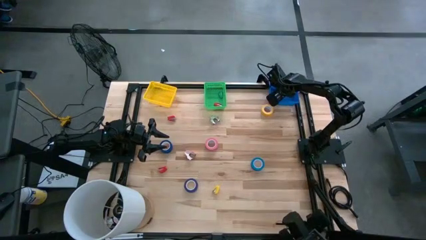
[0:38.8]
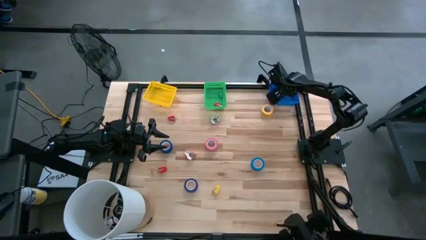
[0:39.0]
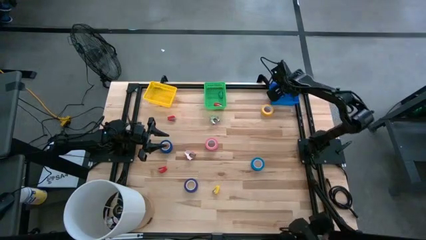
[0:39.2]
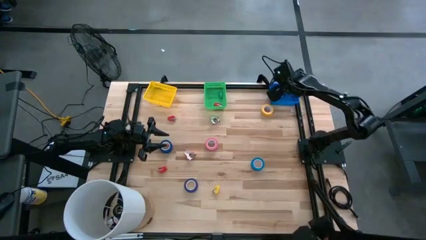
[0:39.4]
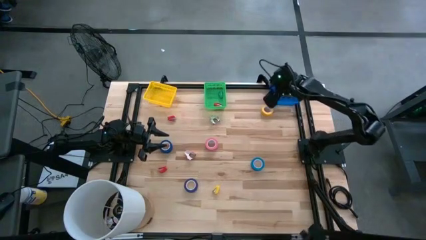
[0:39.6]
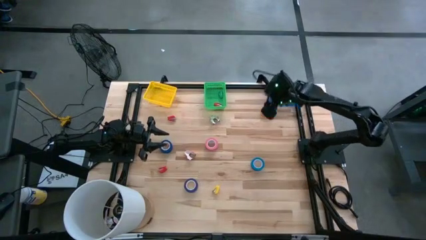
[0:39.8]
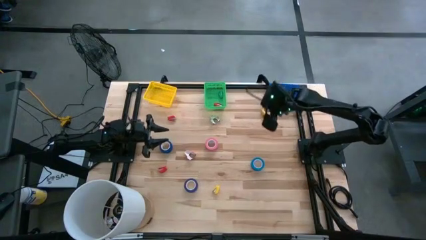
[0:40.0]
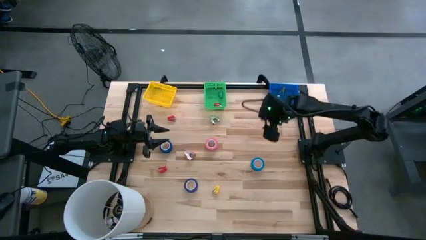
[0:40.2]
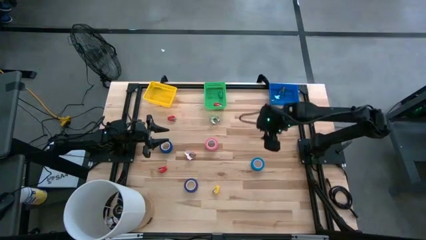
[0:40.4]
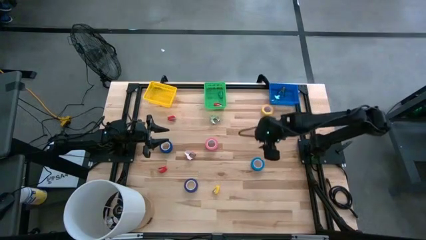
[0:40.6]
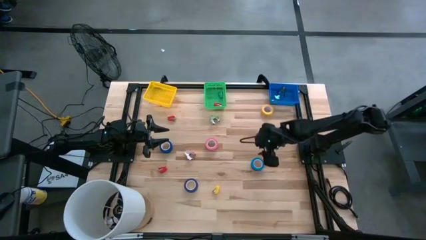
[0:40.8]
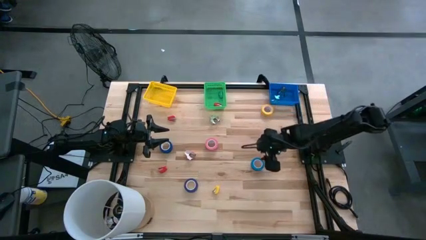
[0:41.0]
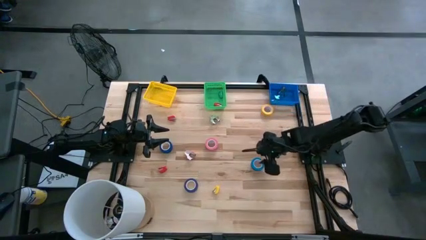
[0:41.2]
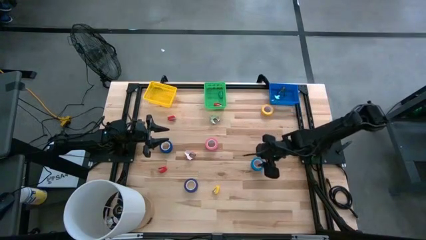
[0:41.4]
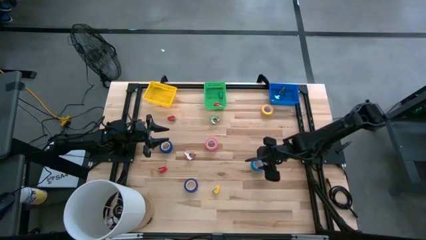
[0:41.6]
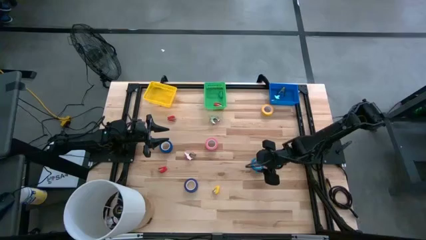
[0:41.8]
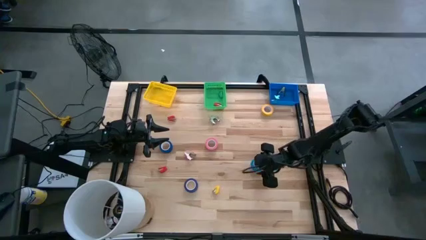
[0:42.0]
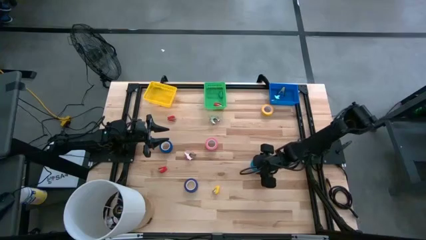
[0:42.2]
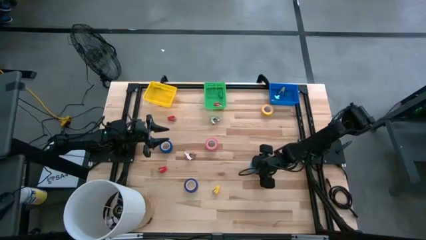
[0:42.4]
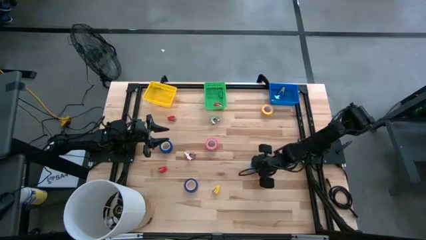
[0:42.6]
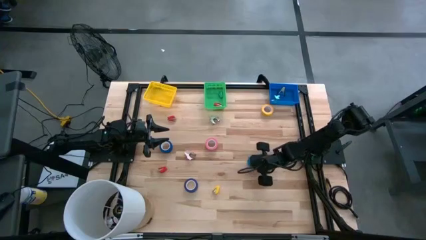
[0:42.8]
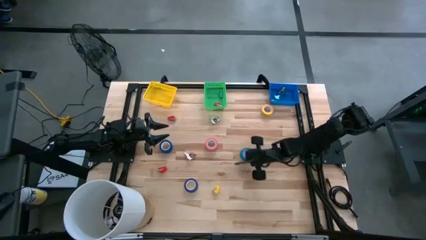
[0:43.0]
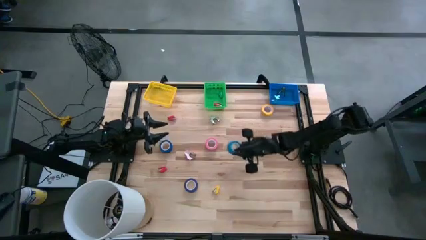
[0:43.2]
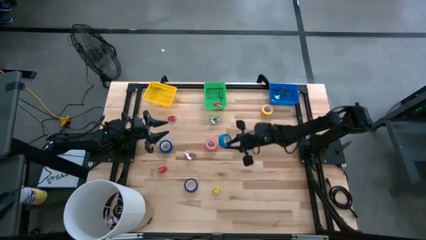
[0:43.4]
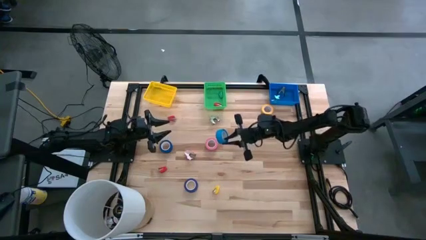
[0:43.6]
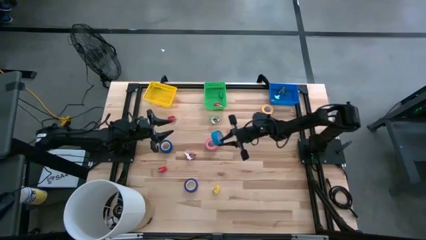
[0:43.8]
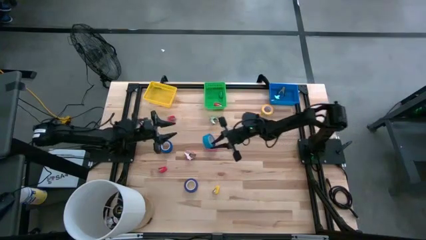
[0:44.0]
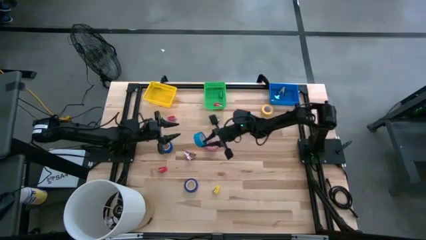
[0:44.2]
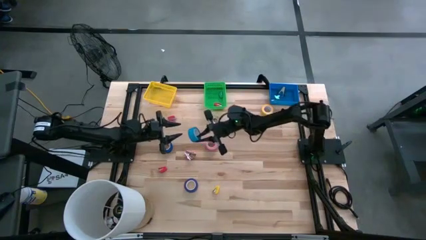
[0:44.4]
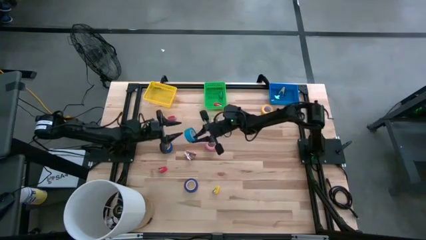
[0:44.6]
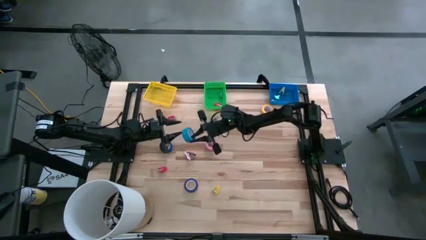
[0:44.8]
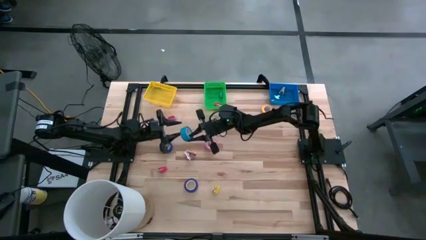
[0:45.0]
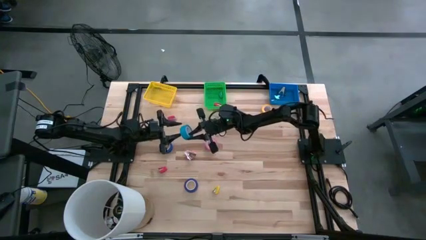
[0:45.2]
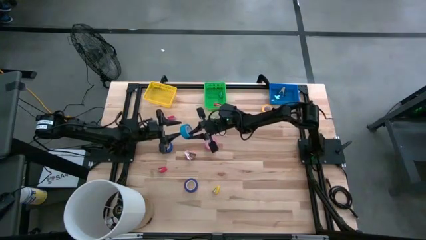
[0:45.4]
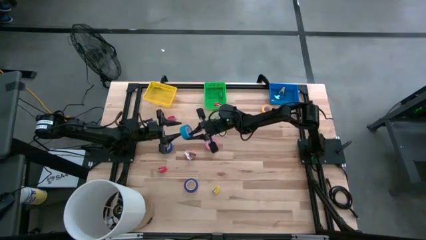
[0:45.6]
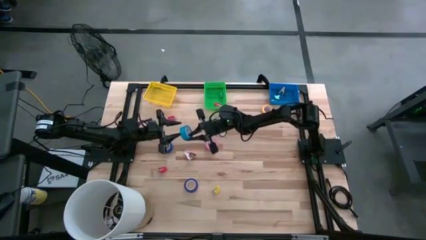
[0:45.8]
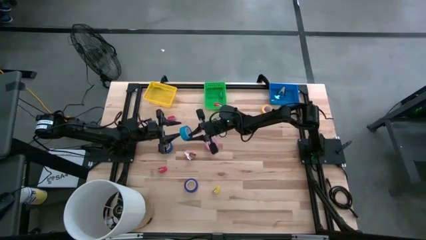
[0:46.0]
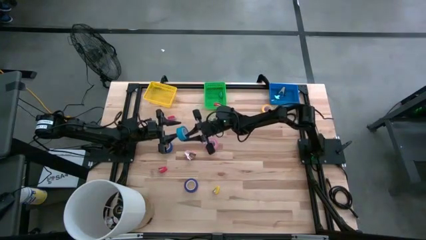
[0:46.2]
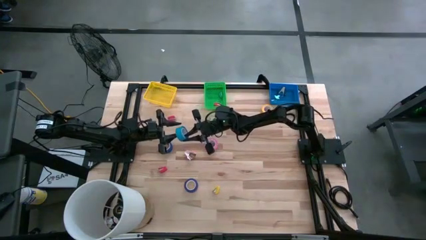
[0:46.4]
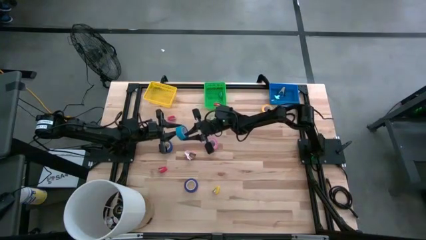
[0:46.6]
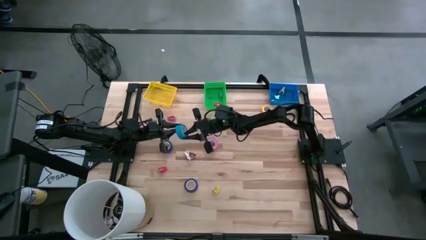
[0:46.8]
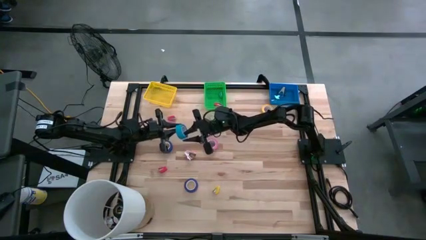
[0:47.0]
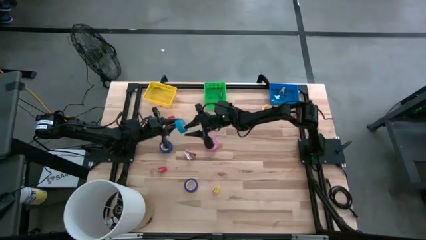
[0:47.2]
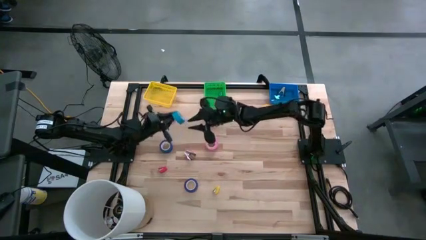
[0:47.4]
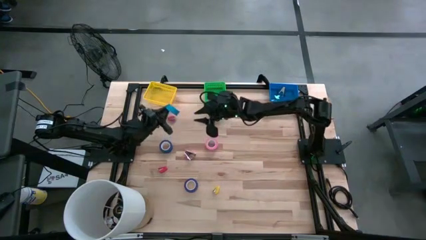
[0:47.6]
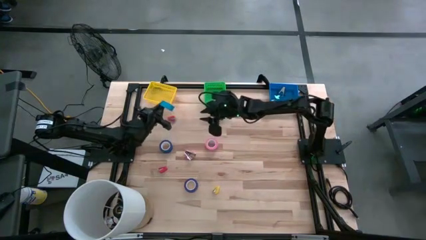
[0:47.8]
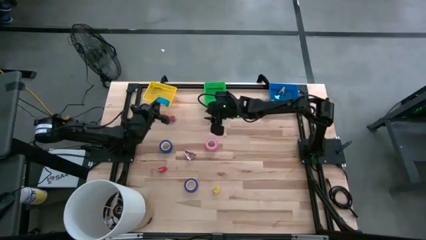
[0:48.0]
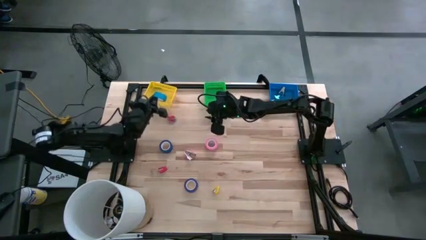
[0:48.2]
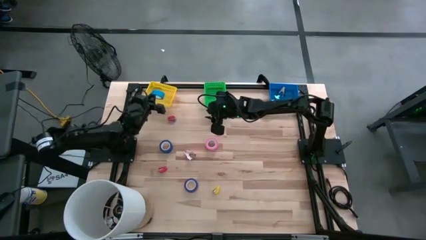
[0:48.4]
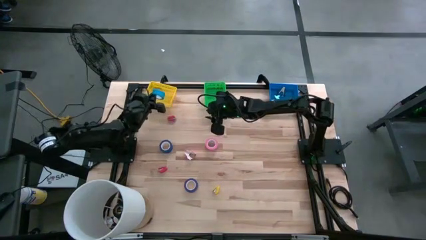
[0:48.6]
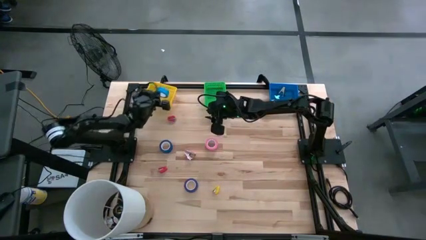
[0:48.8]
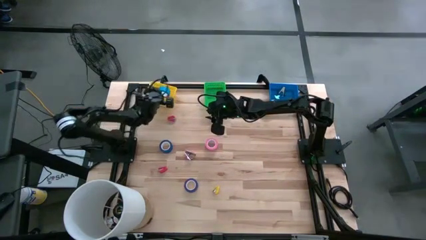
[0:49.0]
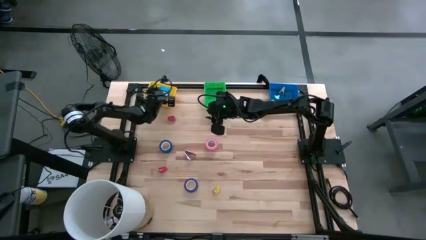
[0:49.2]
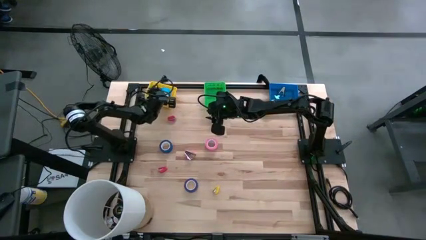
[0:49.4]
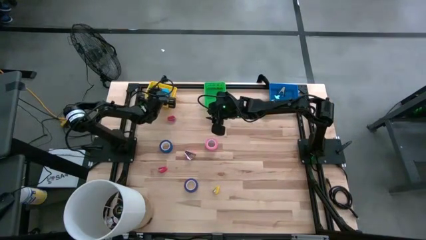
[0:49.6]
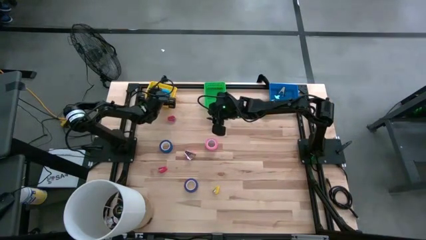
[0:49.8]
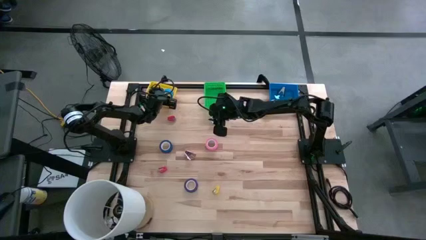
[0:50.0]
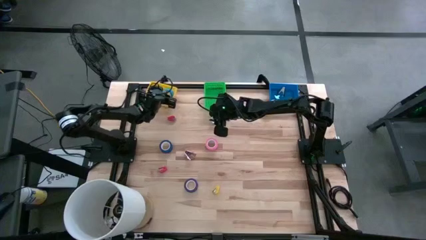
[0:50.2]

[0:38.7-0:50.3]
Task: Pick and place Stapler, Stapler remover, tape
Put the blue tape into the yellow basket

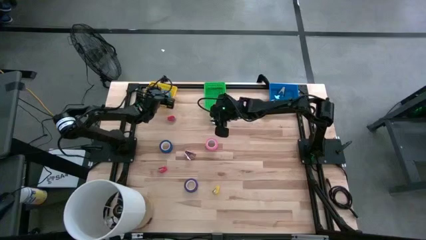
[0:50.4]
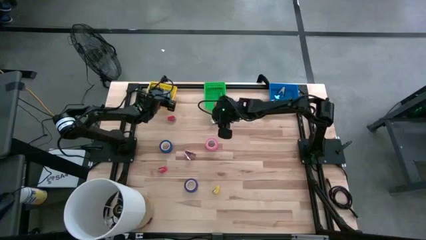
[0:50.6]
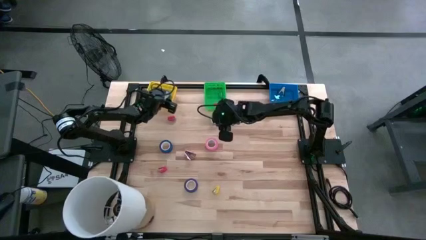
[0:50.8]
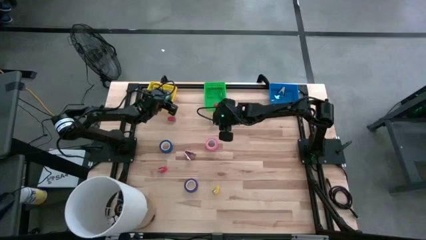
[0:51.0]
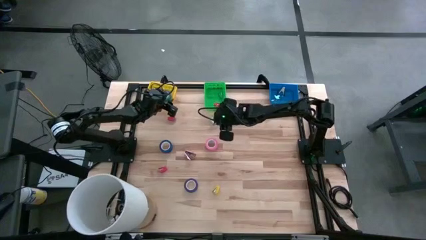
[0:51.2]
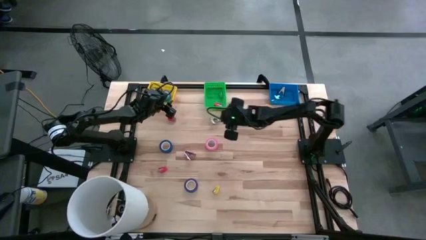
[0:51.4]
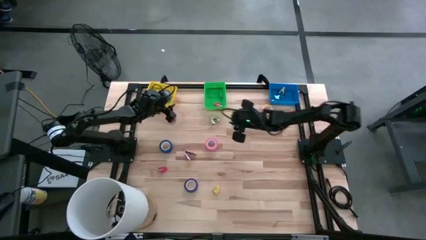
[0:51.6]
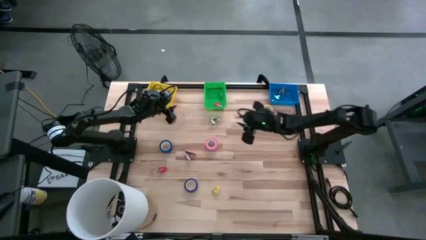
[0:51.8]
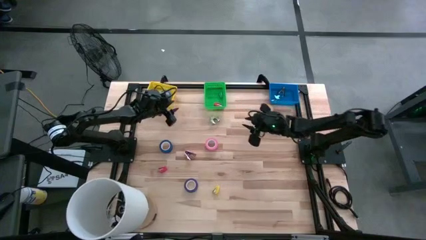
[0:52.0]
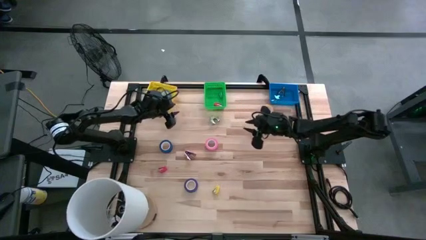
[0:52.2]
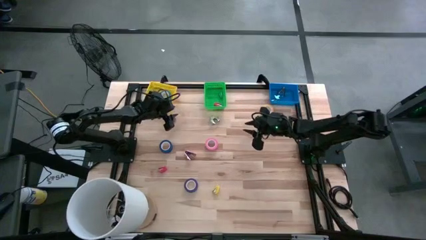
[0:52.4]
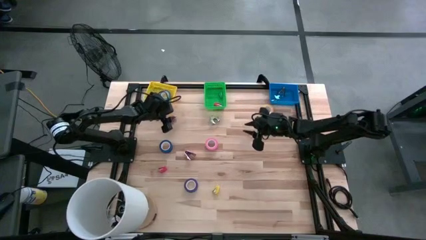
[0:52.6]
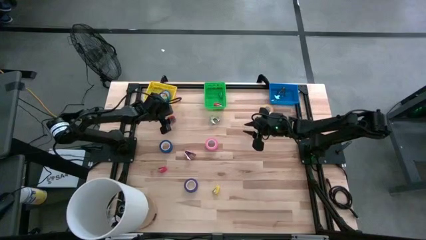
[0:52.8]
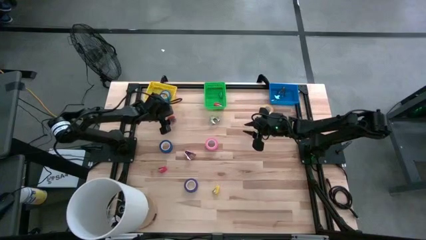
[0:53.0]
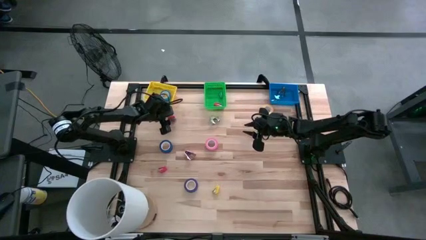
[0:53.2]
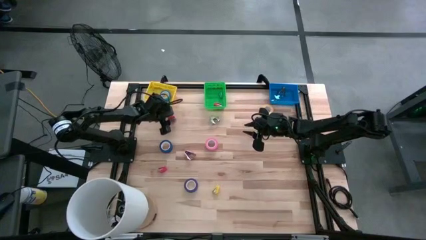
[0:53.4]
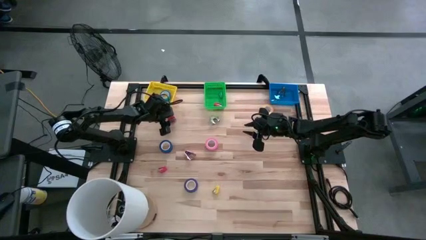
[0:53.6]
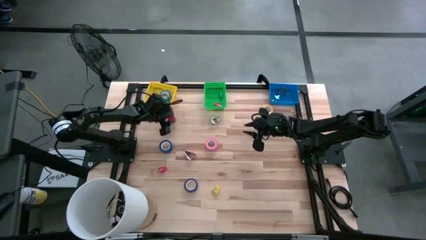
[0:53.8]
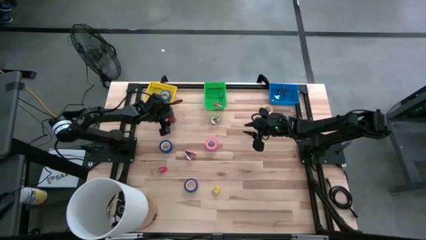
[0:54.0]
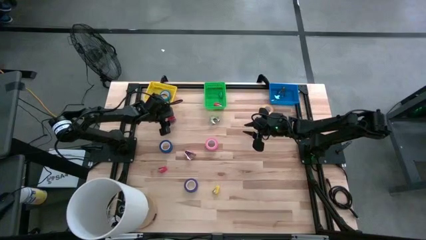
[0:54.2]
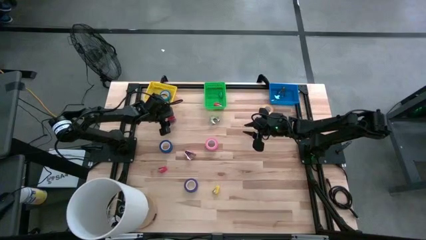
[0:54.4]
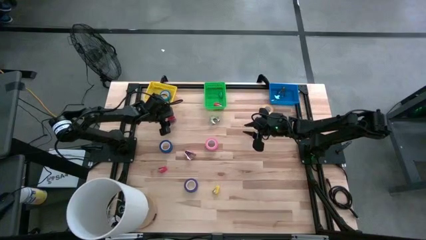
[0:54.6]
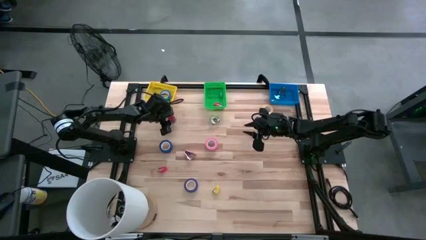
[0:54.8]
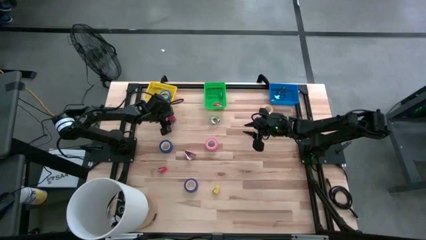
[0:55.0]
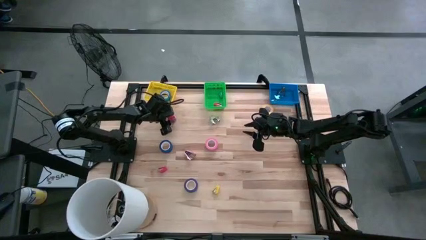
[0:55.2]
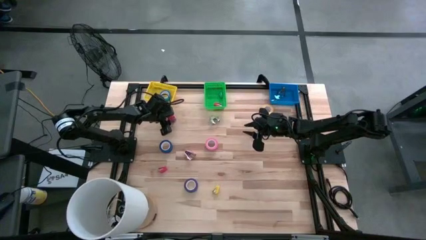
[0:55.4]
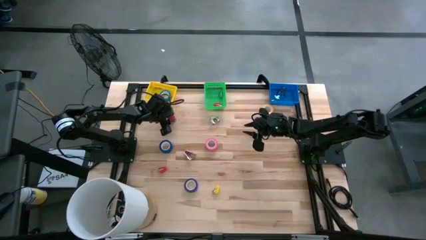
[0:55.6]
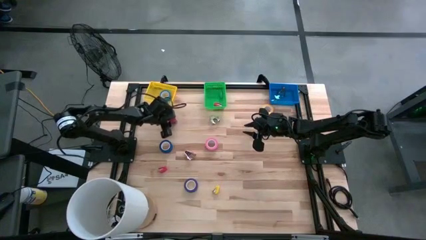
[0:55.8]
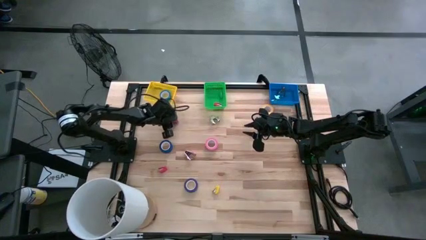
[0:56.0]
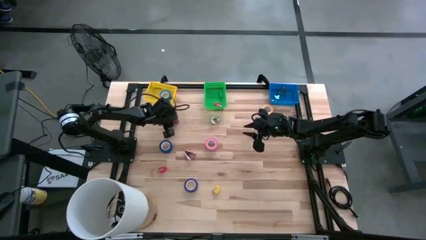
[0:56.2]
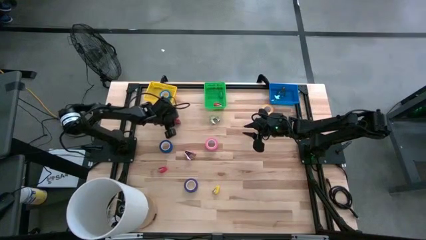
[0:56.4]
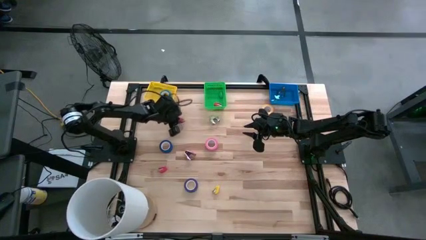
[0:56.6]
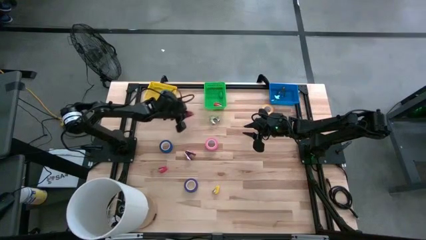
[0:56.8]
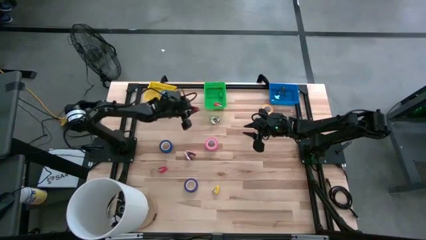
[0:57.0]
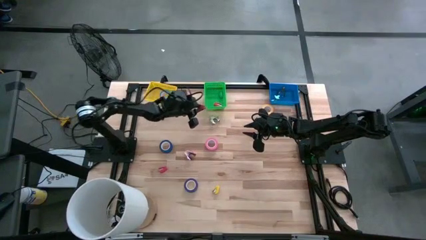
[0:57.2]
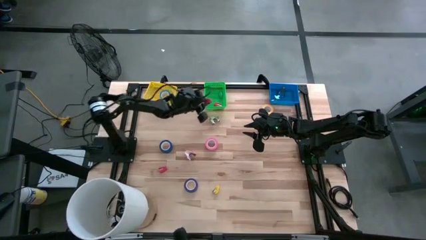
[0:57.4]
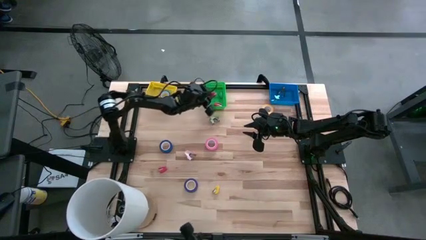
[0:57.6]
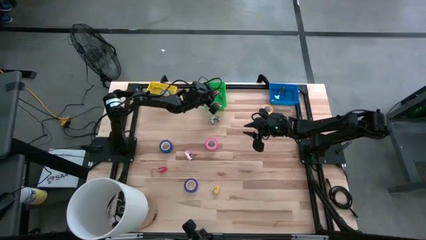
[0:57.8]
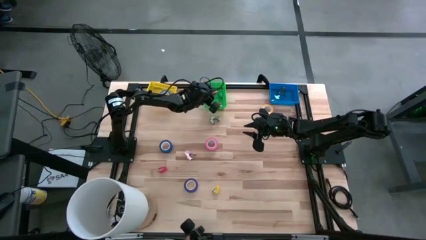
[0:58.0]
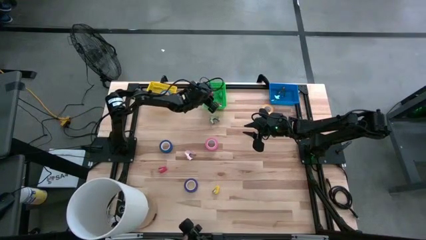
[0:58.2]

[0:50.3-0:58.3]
Put the top red stapler into the green basket
